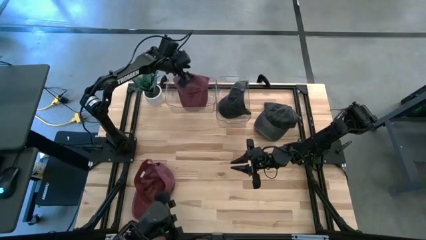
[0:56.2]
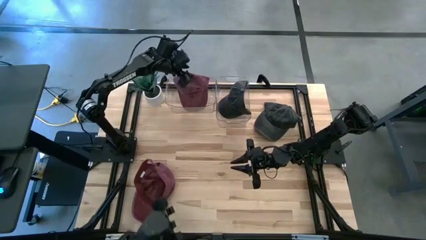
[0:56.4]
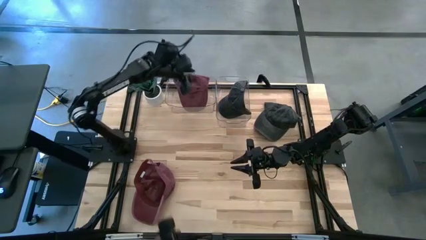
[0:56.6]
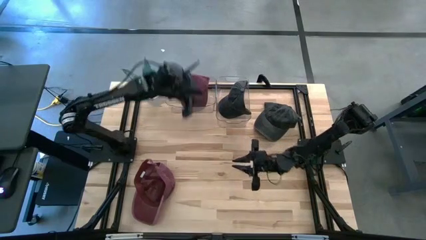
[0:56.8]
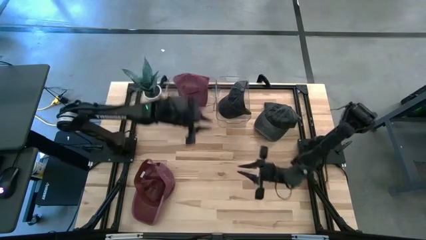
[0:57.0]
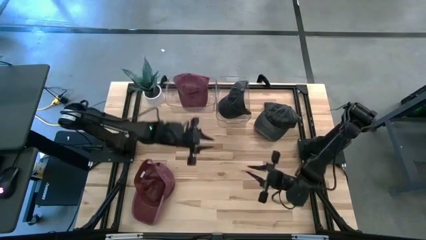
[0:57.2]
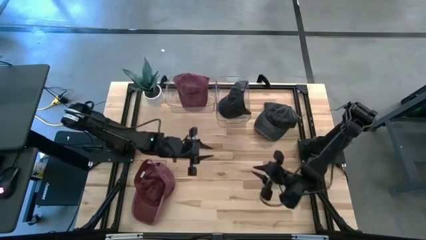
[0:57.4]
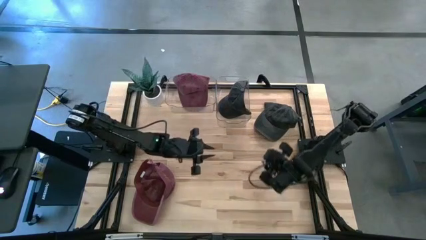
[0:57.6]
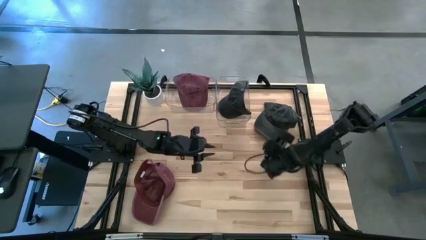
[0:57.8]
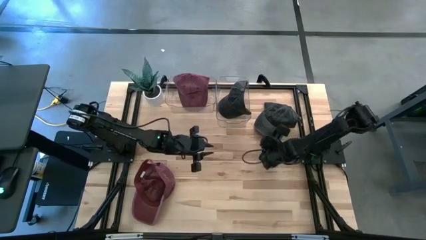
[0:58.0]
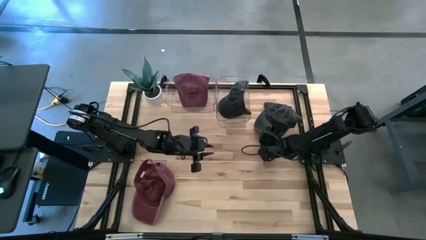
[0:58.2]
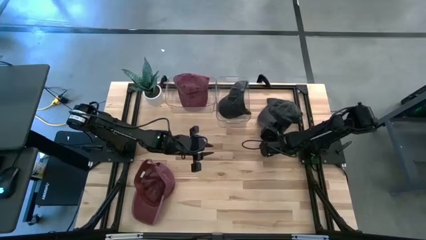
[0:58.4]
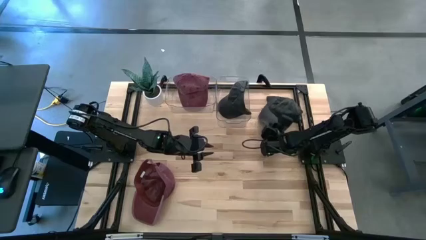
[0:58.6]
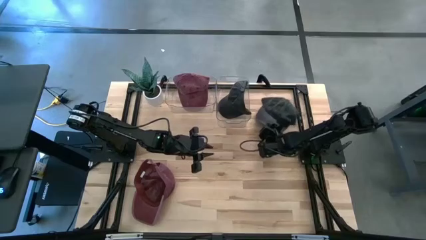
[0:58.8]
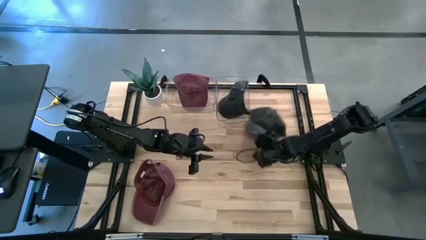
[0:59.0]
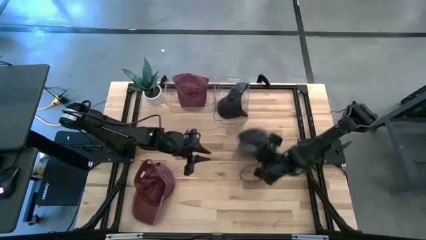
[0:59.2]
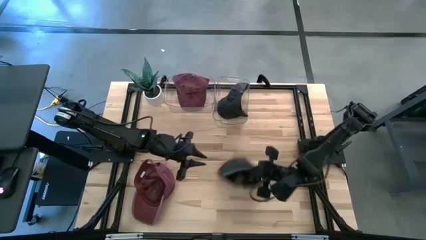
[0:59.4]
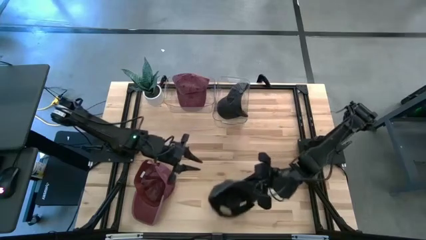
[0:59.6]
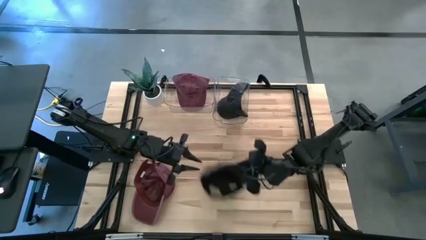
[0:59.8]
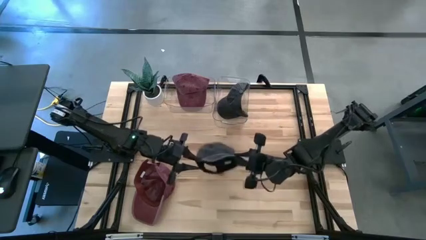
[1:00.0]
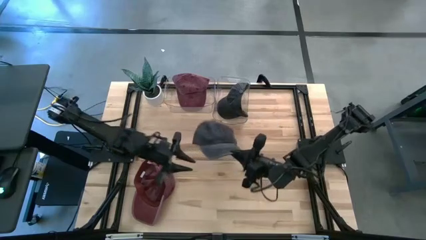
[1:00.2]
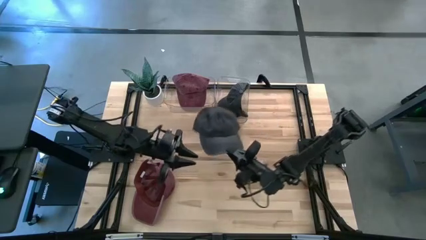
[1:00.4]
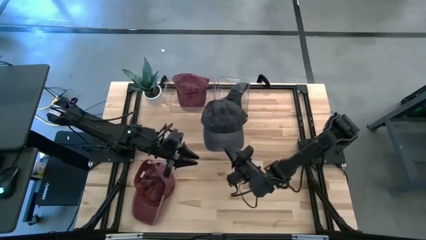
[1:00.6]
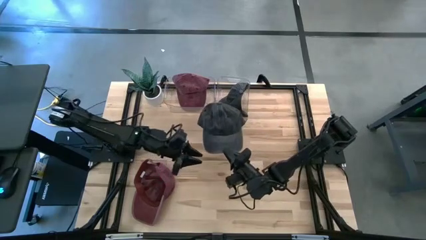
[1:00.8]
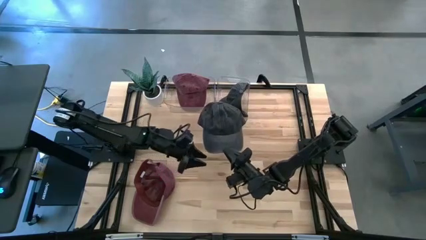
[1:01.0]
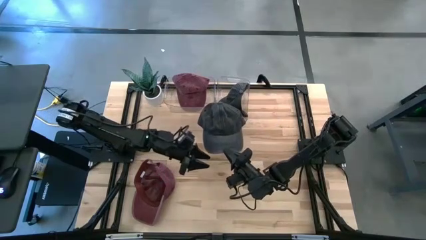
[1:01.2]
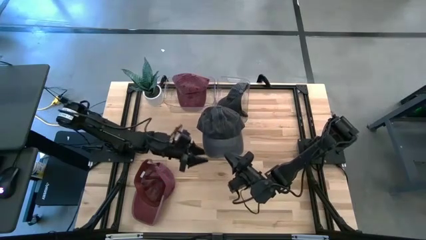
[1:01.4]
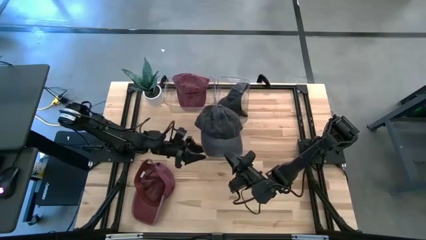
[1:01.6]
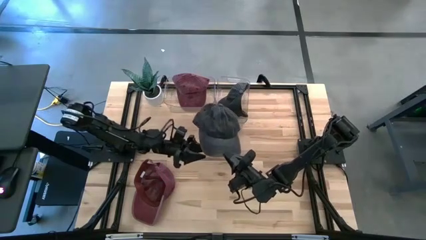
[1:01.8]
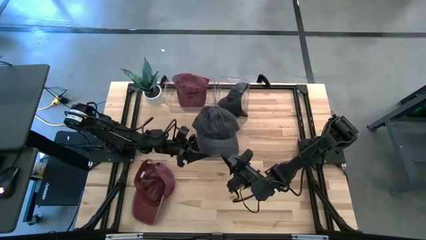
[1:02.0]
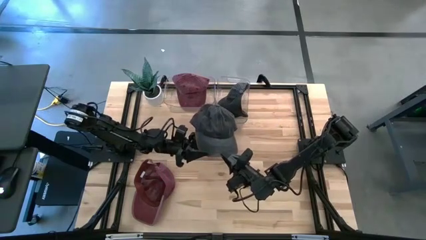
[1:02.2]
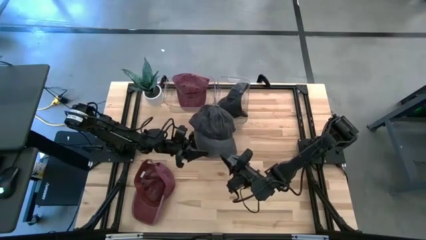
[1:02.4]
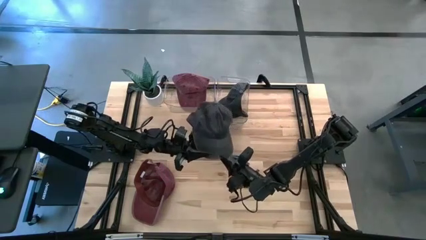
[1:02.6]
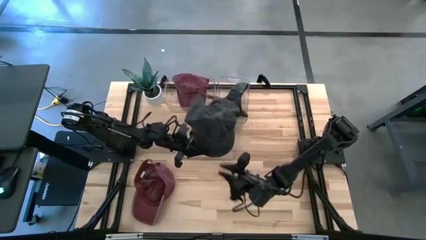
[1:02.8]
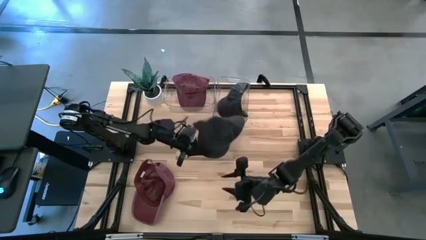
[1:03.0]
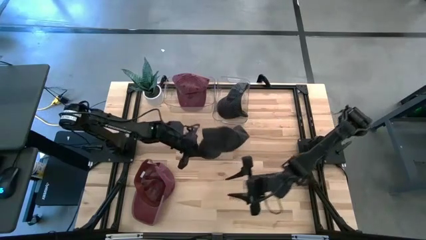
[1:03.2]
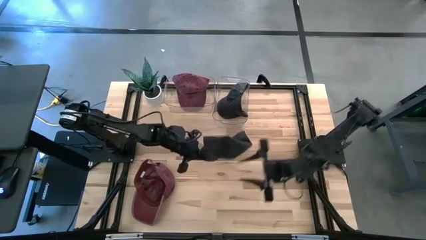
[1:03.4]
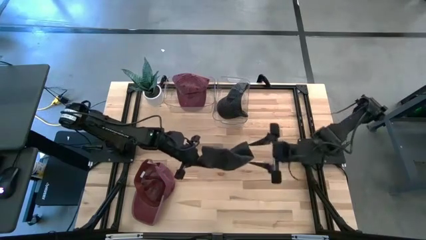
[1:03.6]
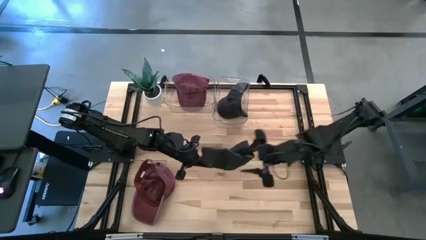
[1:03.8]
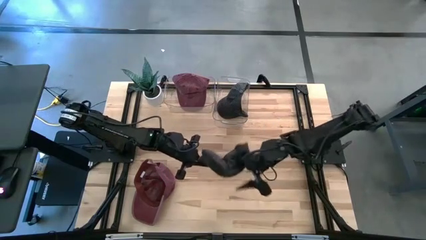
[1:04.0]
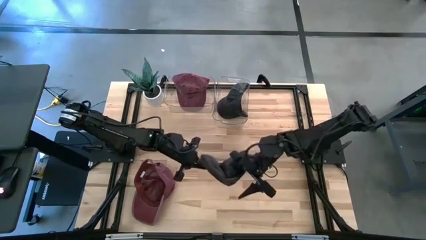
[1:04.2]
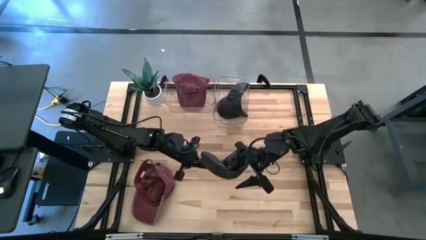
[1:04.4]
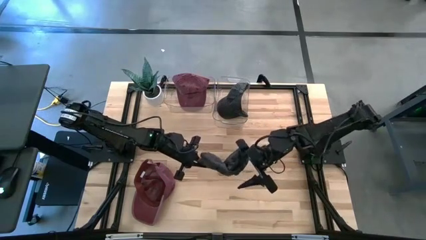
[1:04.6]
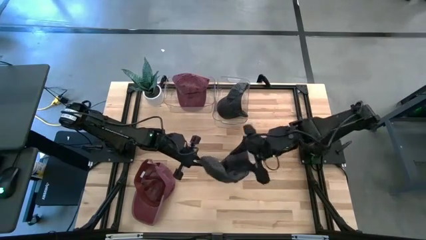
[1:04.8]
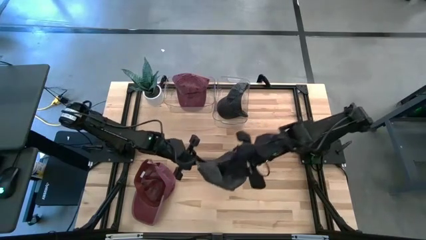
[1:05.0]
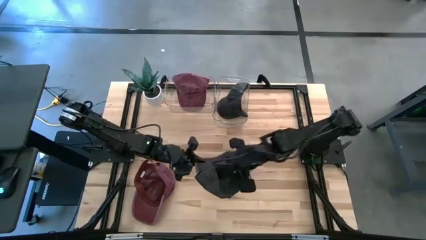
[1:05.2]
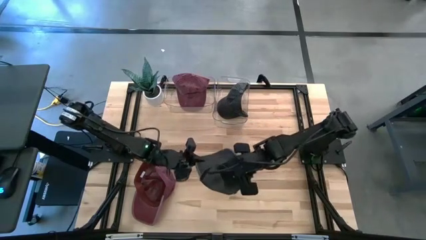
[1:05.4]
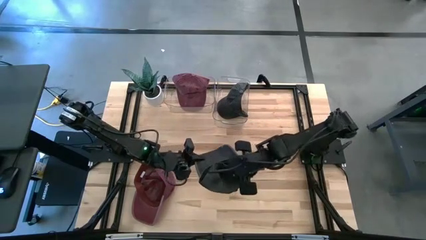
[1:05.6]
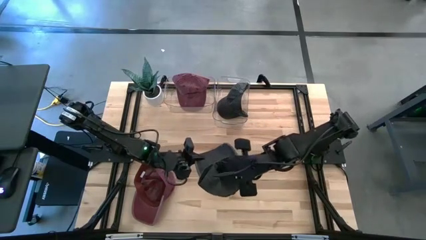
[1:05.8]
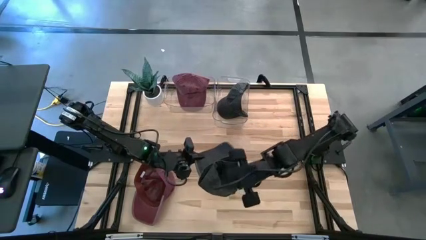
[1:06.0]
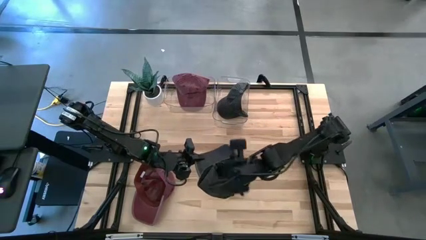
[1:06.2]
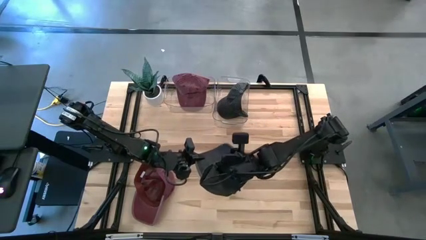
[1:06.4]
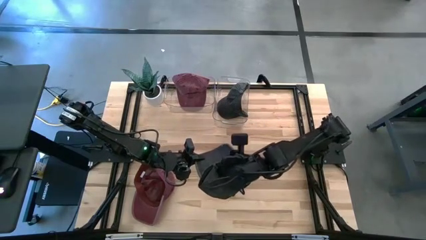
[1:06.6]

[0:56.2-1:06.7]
Task: Pick & Place hat
Put the black cap into the right transparent bin
